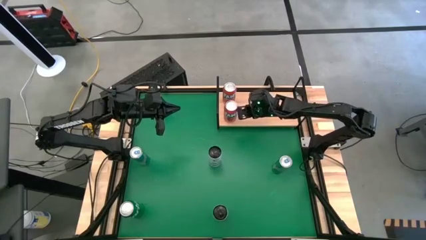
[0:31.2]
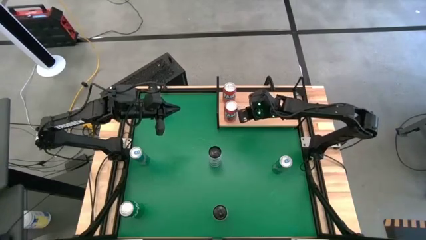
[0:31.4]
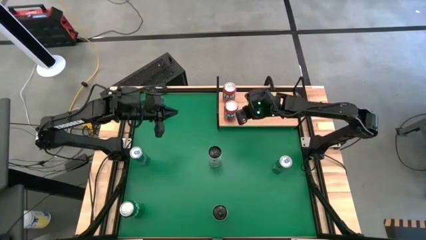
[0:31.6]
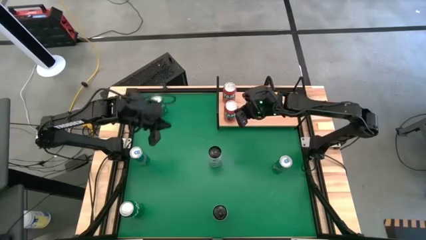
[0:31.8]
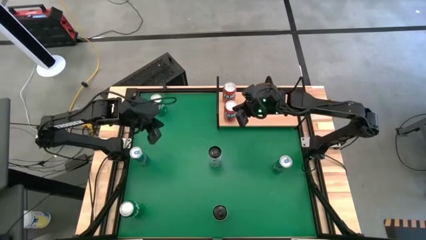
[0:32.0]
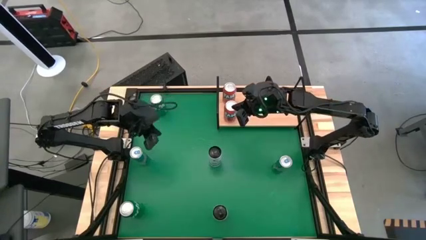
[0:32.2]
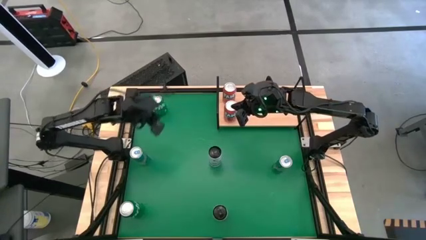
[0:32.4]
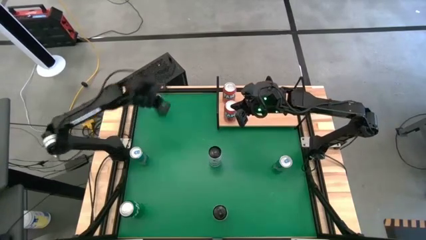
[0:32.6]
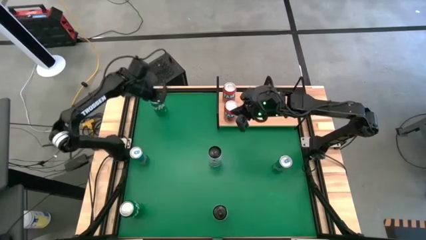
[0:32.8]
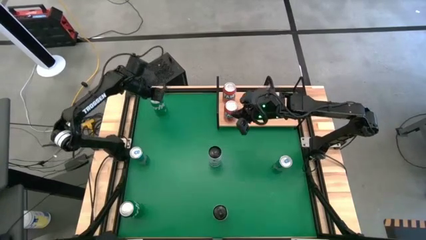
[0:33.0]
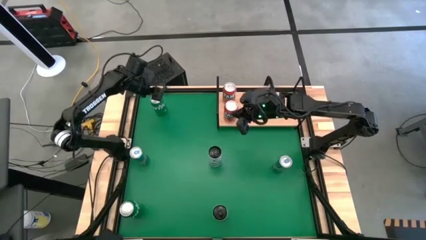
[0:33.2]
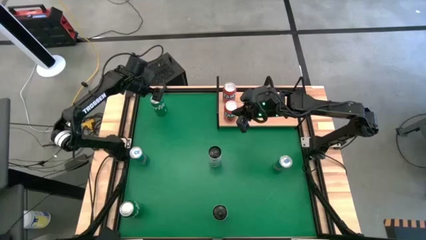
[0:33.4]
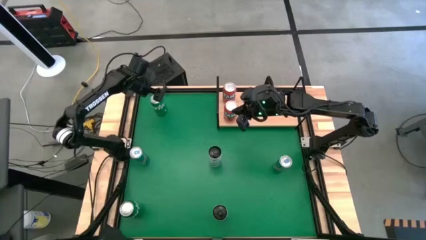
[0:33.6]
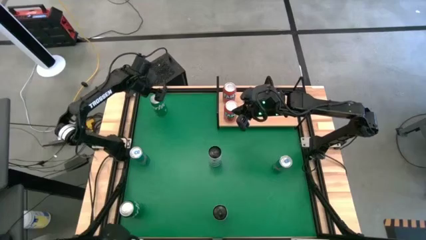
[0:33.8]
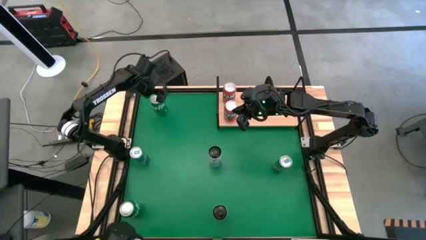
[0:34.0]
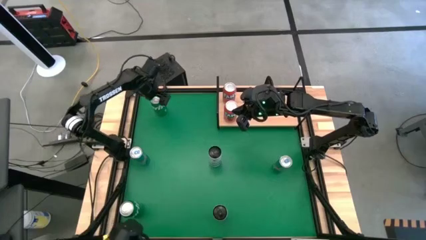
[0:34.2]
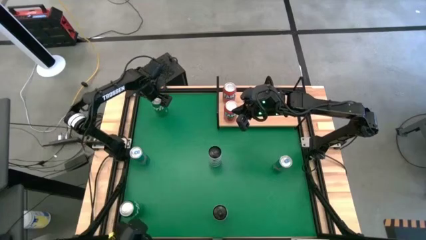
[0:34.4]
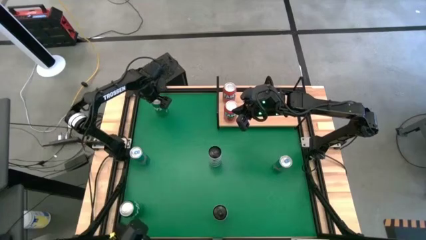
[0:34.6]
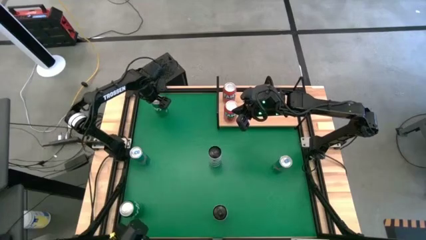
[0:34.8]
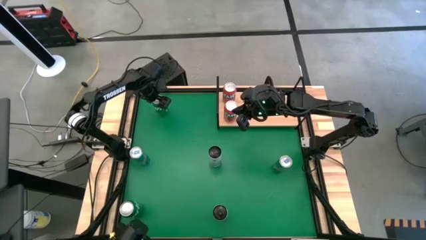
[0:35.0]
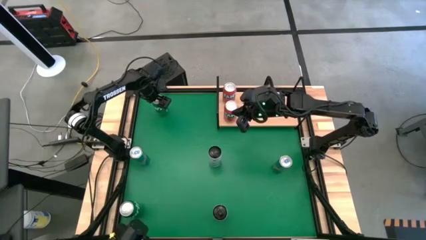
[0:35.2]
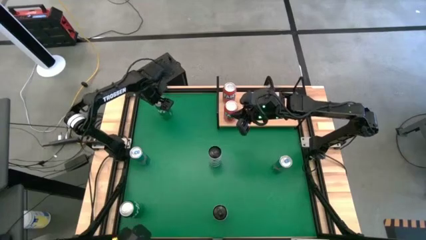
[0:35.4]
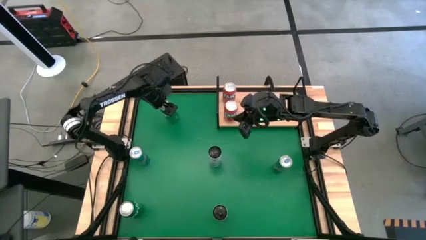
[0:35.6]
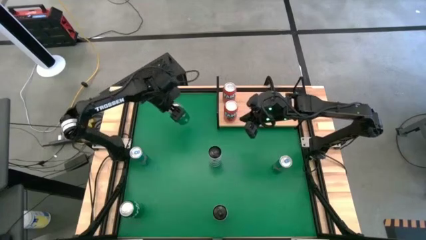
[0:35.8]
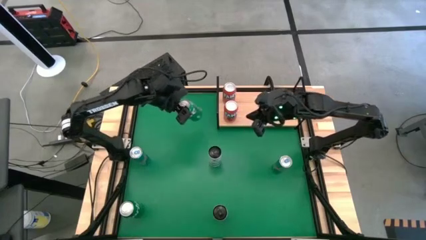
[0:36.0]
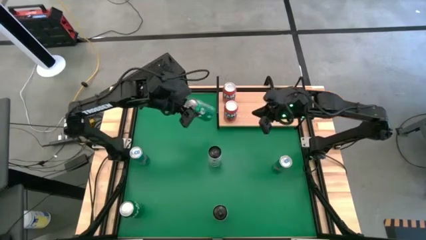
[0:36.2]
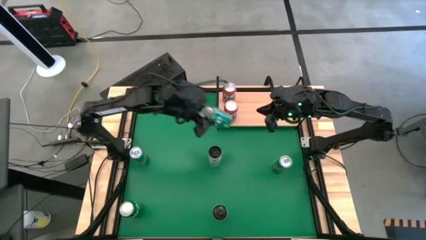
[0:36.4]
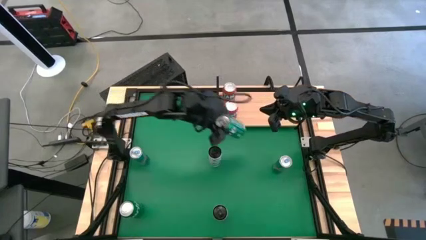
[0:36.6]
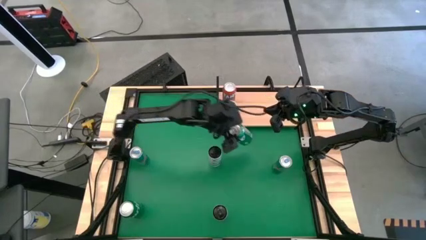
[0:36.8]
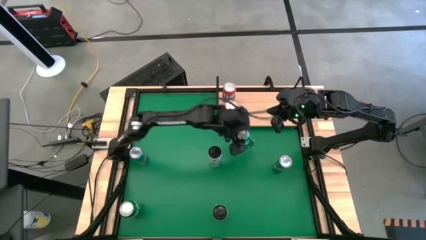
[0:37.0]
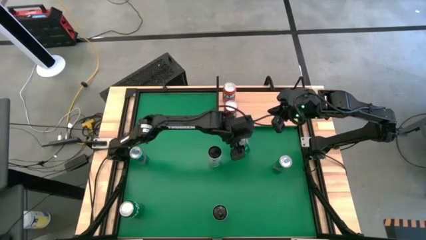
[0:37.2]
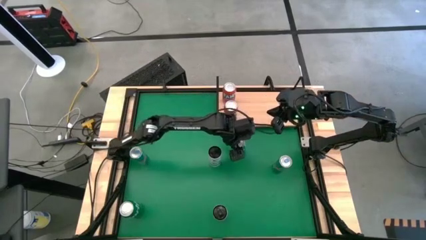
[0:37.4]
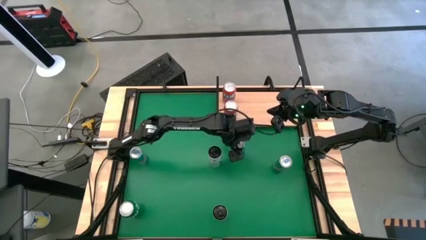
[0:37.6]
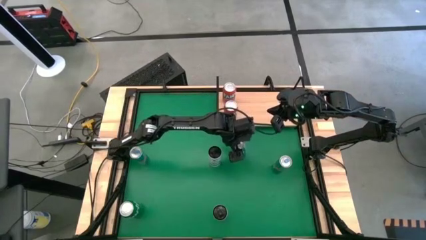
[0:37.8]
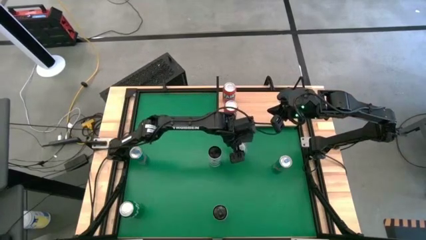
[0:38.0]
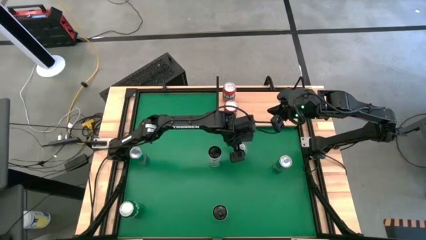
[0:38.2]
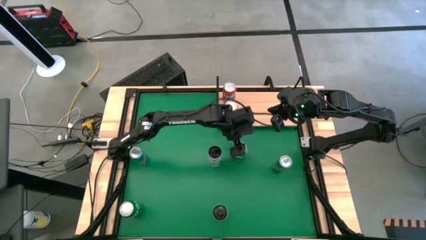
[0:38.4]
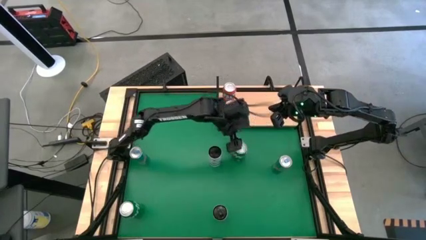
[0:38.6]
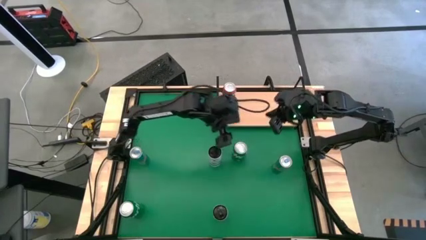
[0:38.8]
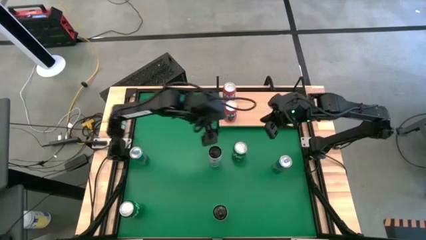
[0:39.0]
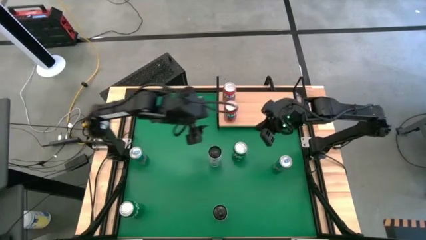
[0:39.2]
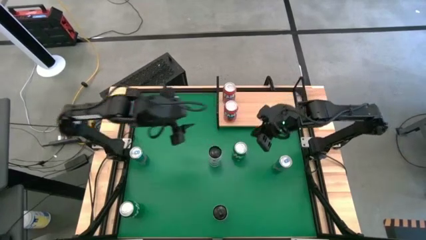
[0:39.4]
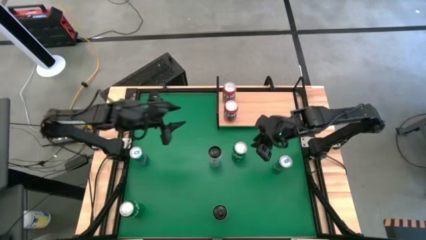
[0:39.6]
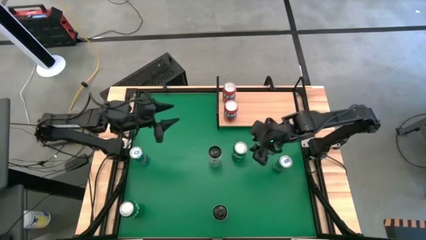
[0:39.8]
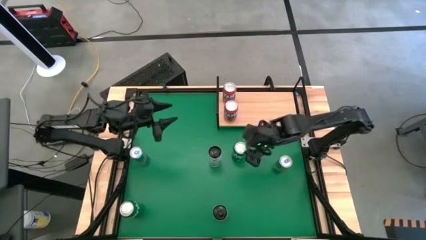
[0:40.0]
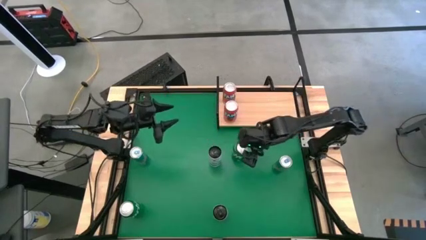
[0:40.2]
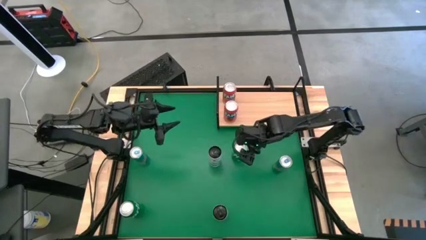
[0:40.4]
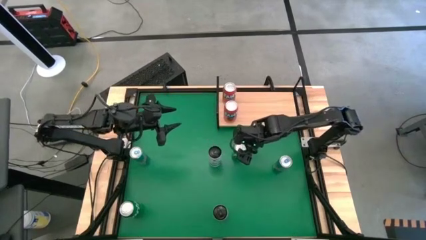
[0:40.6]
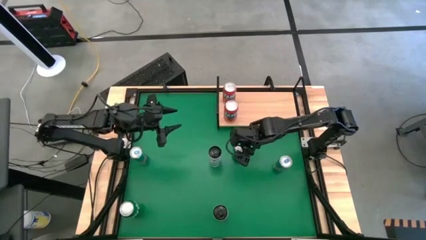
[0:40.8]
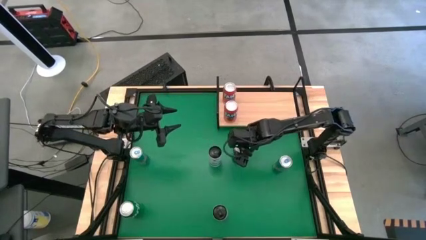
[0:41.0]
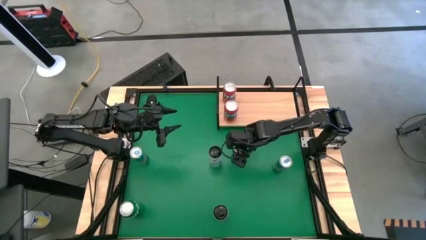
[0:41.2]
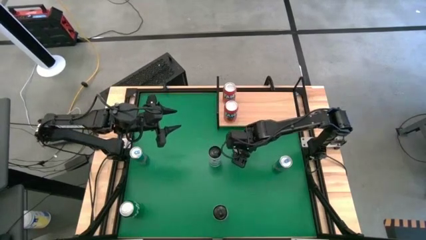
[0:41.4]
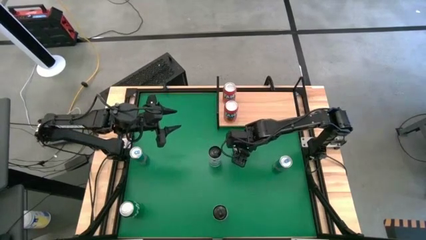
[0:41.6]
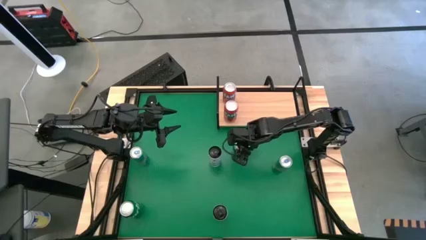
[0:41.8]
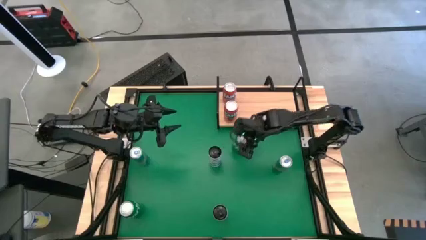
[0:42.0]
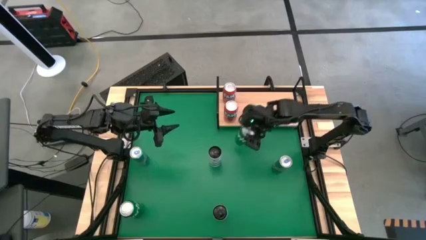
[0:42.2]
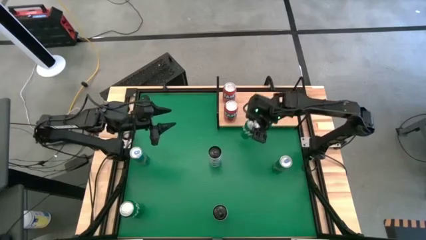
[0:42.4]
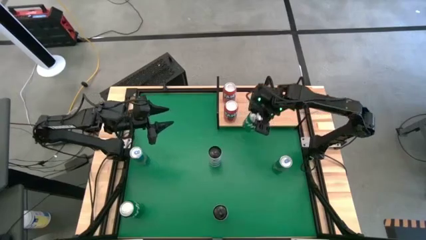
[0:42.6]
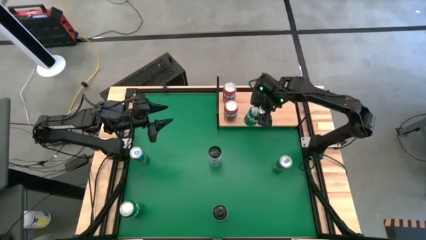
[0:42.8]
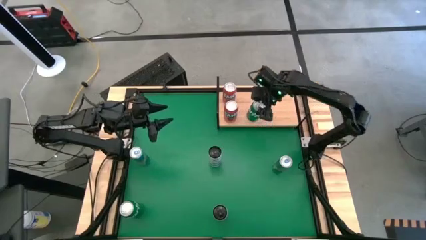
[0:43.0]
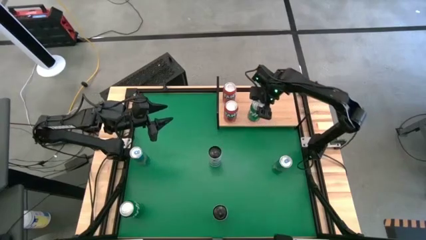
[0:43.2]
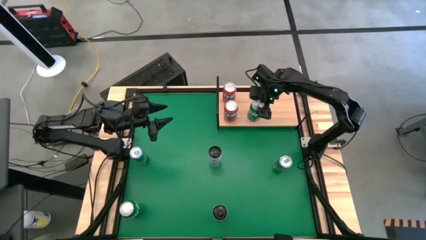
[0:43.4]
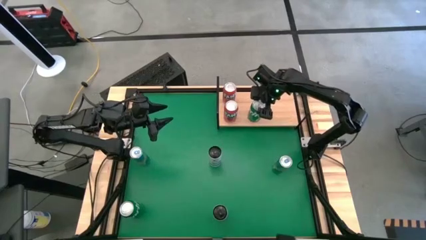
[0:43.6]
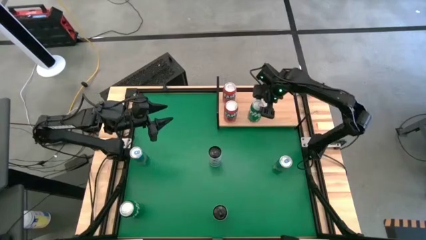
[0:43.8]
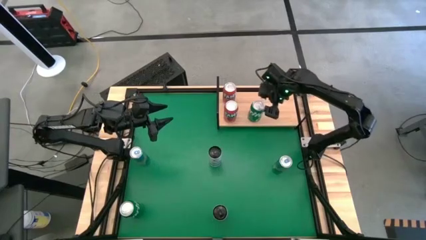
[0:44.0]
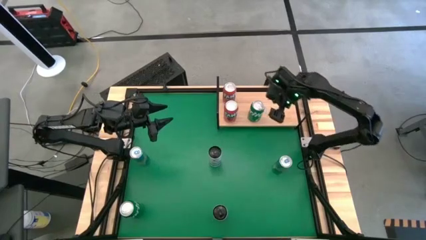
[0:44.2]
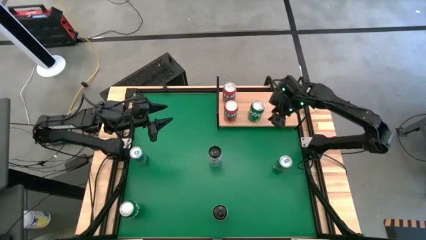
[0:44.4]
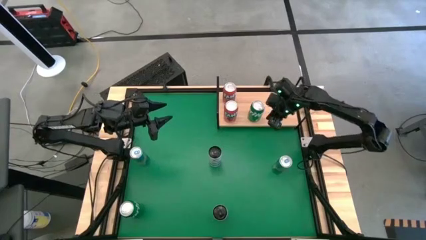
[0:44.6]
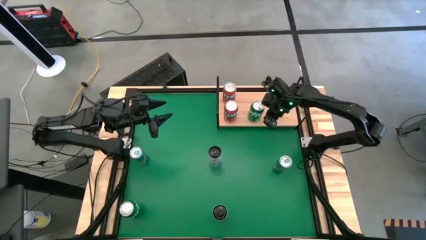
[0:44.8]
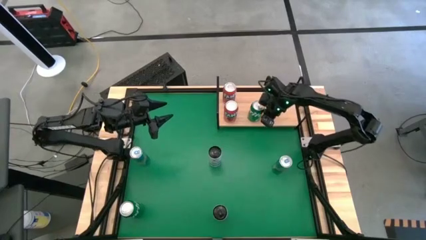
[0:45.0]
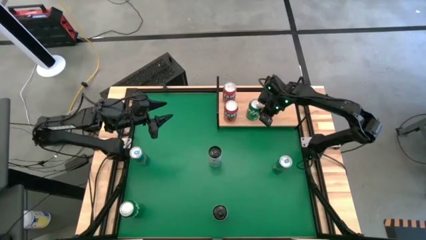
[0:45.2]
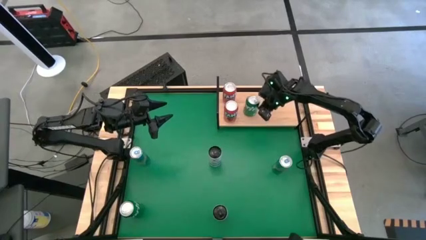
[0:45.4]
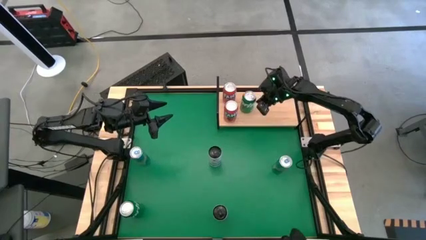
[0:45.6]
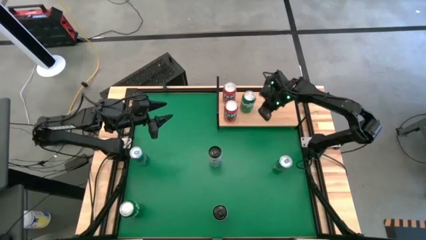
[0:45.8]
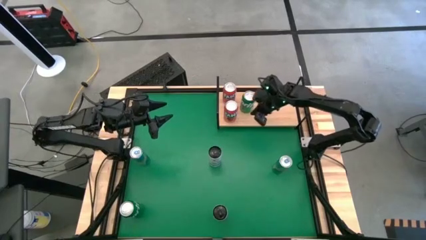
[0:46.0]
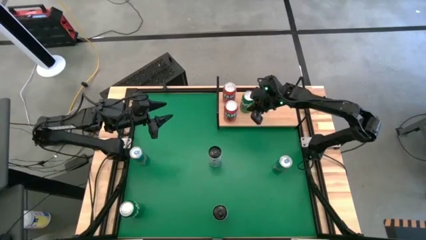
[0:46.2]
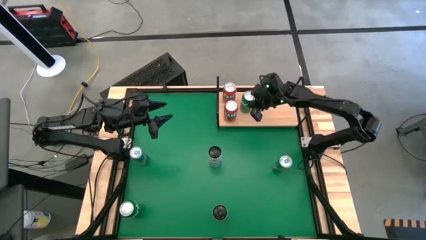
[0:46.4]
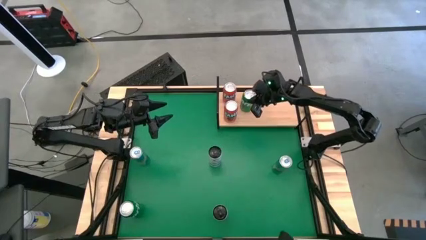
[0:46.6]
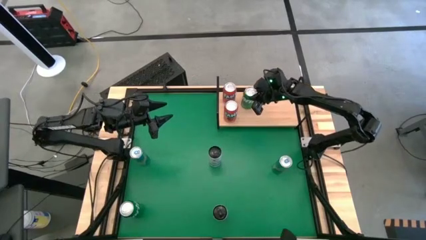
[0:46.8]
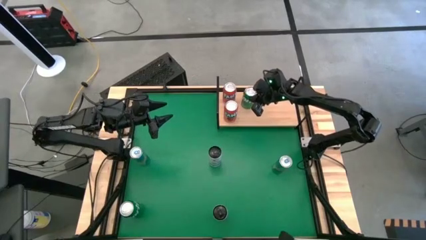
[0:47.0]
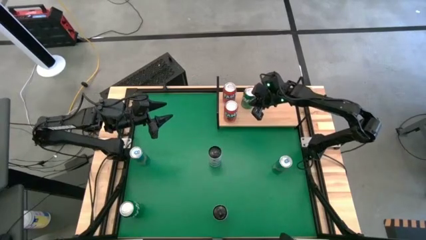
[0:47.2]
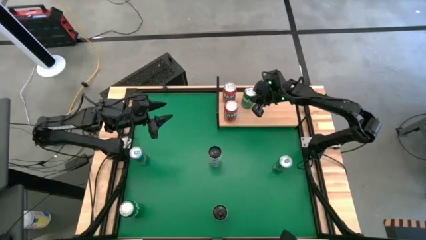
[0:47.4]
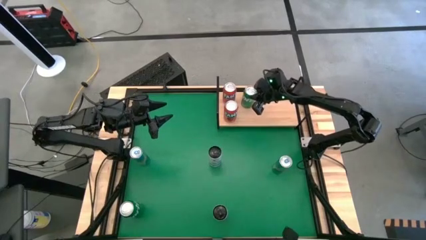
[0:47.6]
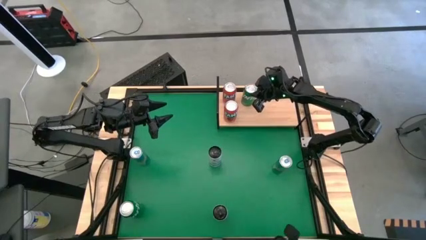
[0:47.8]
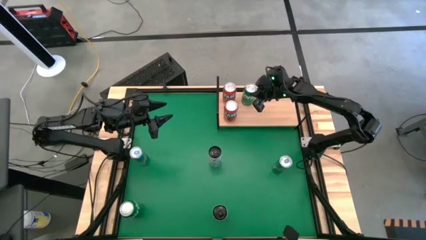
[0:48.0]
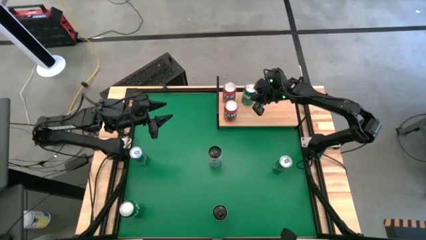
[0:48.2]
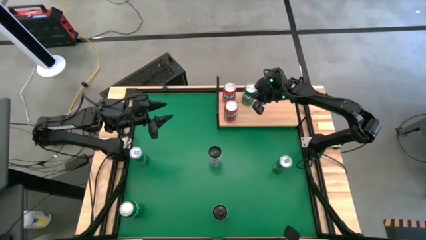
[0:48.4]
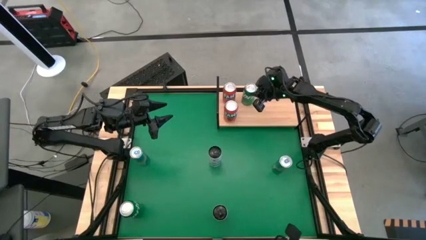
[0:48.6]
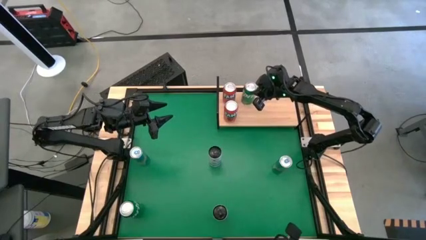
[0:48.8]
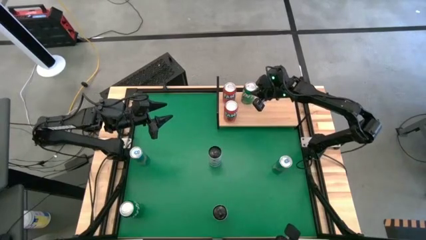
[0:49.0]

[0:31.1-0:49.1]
Task: Place canned beverage on shelf
Put the top green soda can on the shelf
